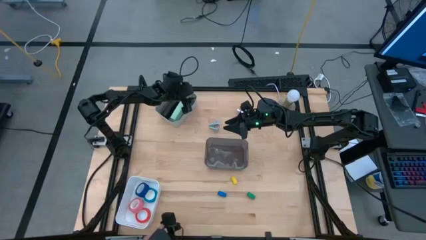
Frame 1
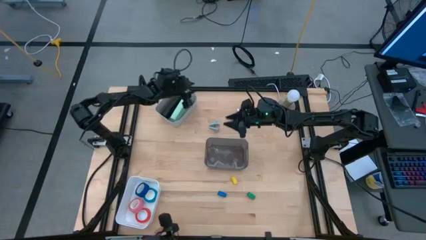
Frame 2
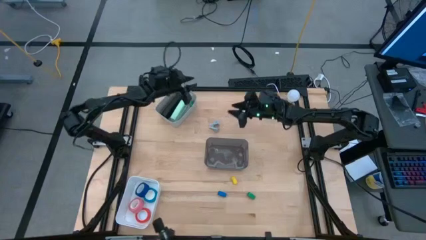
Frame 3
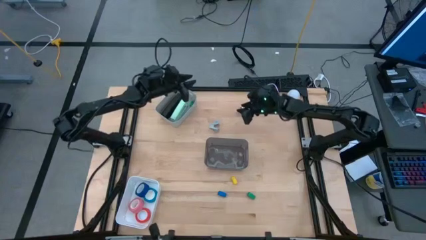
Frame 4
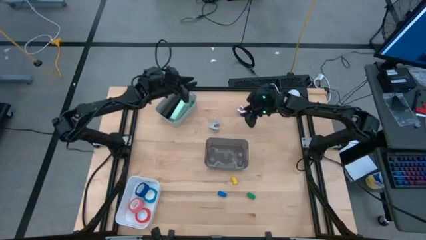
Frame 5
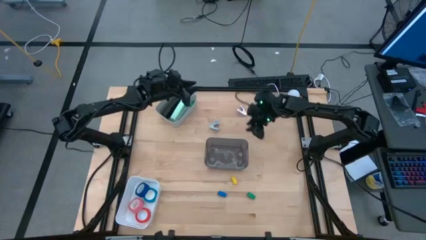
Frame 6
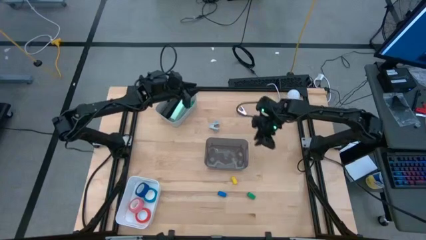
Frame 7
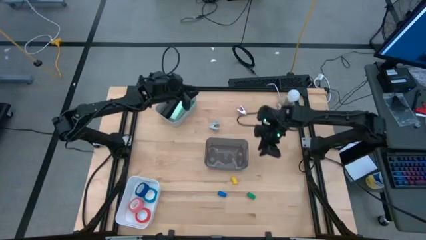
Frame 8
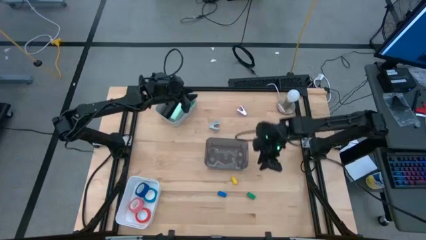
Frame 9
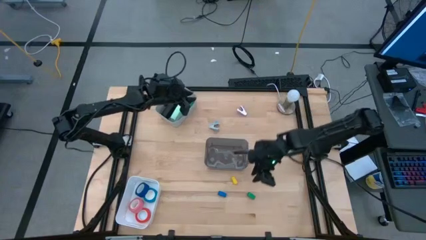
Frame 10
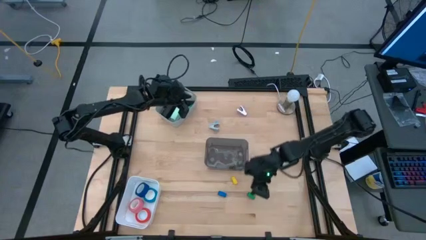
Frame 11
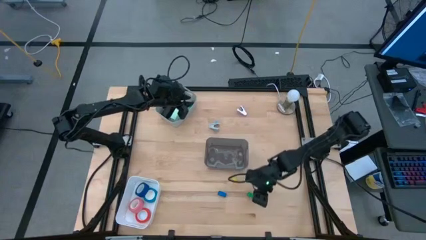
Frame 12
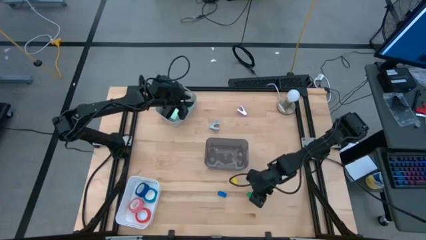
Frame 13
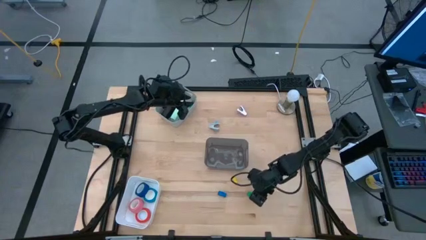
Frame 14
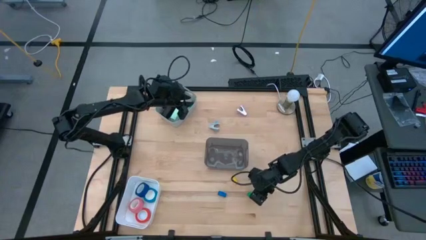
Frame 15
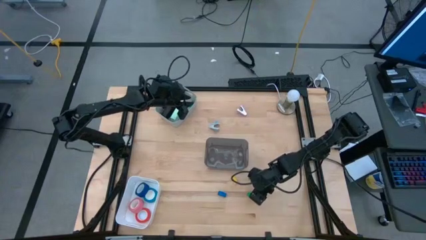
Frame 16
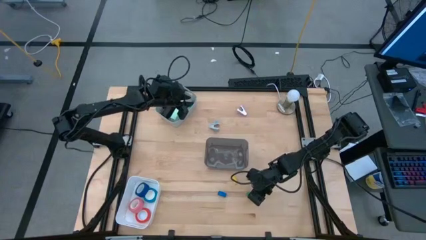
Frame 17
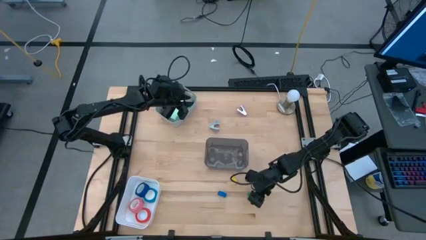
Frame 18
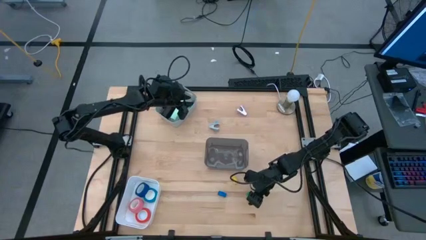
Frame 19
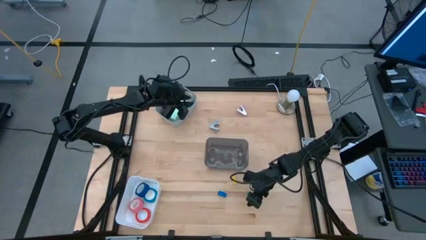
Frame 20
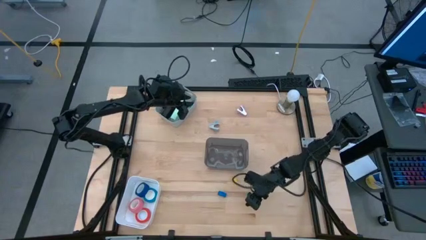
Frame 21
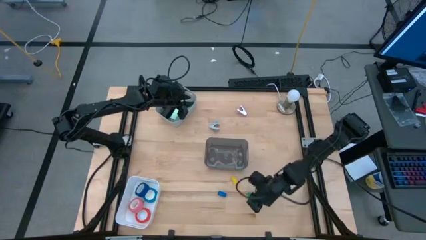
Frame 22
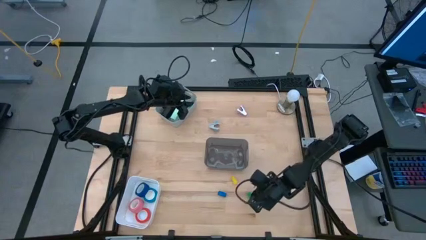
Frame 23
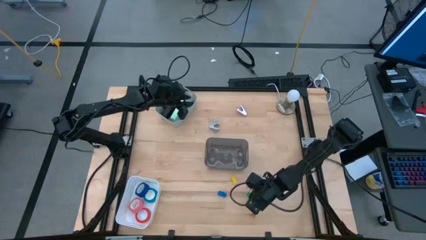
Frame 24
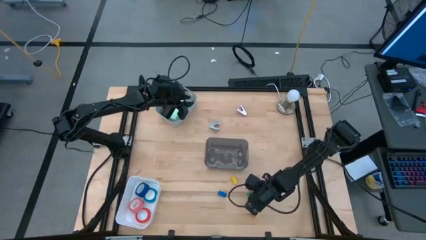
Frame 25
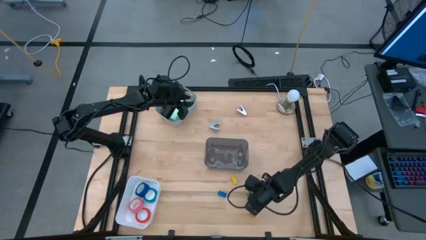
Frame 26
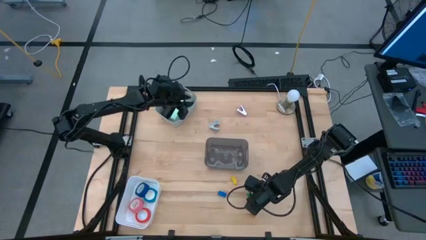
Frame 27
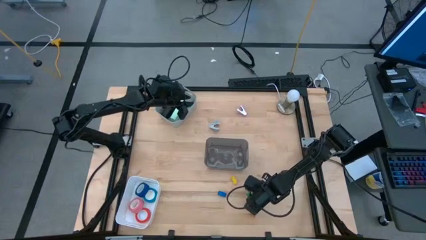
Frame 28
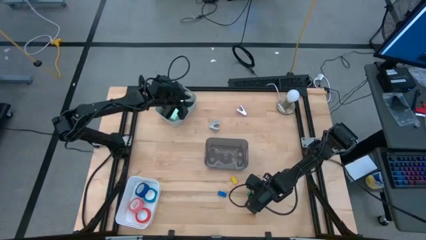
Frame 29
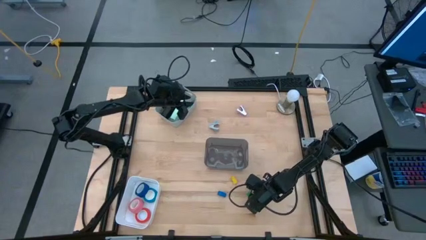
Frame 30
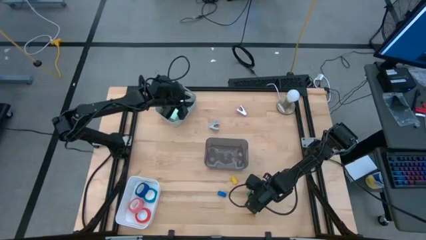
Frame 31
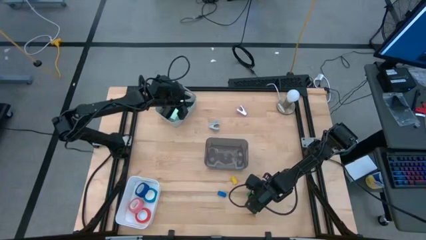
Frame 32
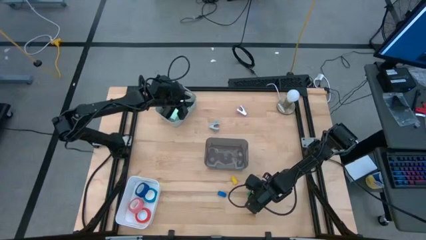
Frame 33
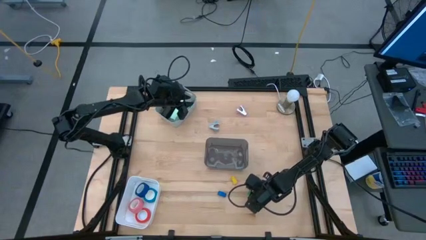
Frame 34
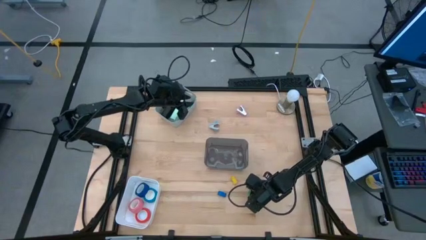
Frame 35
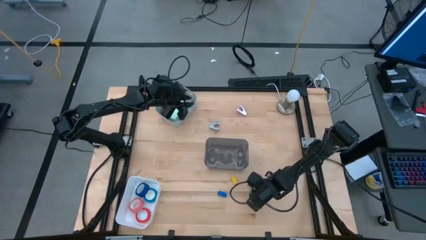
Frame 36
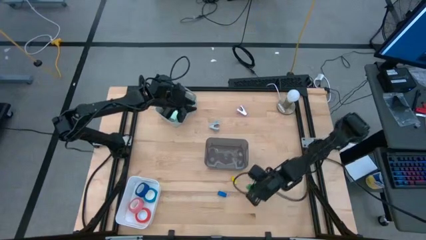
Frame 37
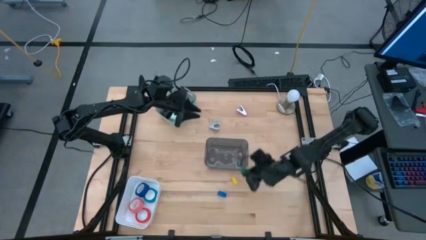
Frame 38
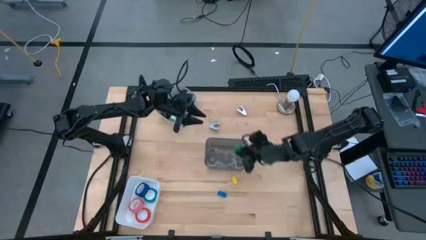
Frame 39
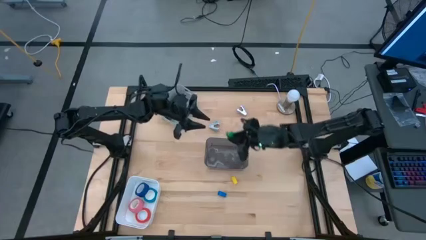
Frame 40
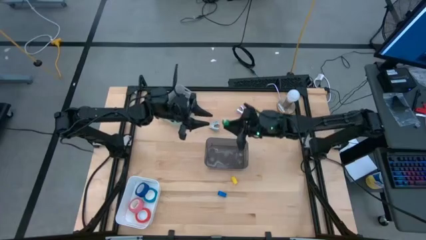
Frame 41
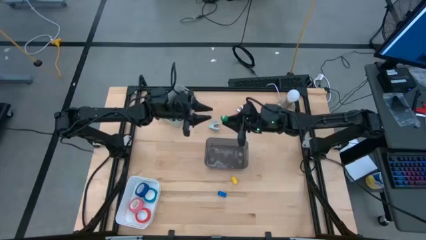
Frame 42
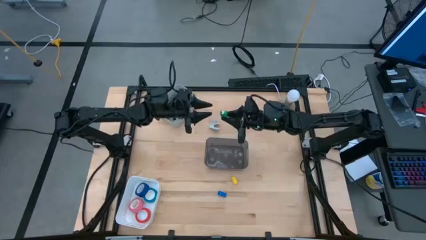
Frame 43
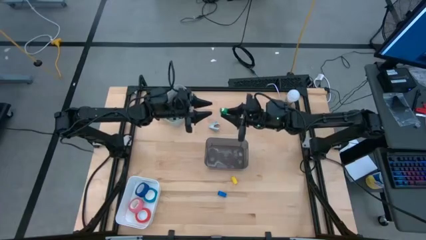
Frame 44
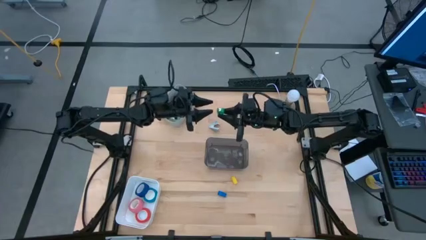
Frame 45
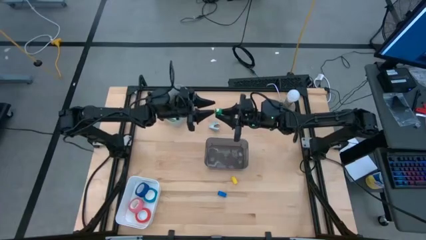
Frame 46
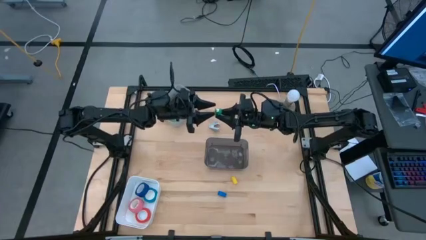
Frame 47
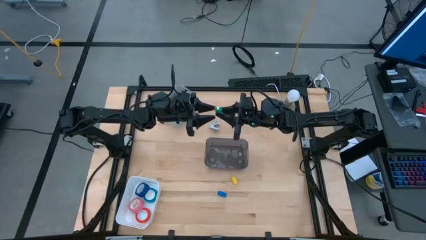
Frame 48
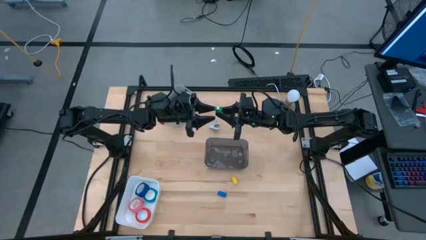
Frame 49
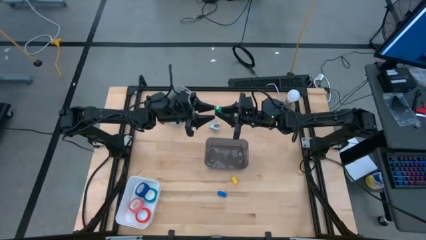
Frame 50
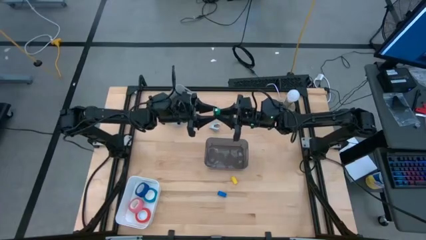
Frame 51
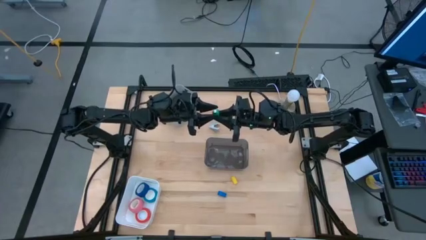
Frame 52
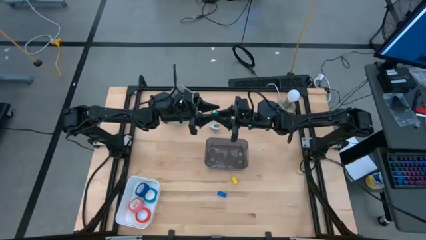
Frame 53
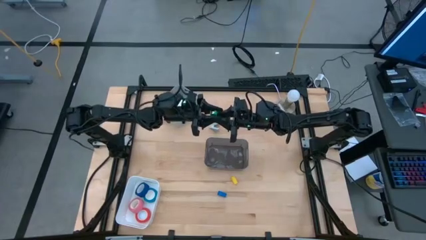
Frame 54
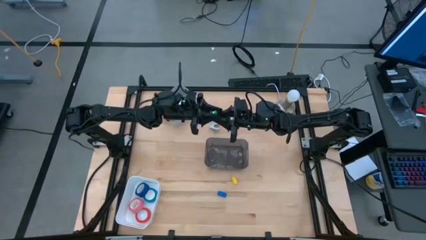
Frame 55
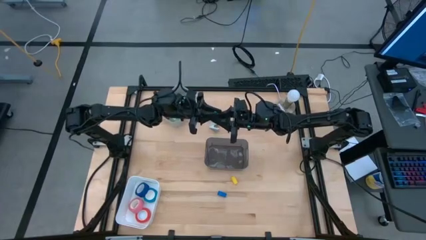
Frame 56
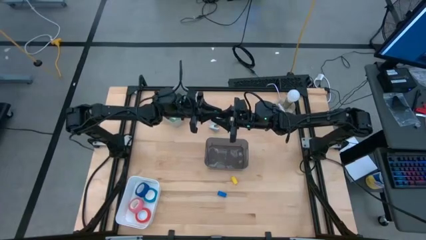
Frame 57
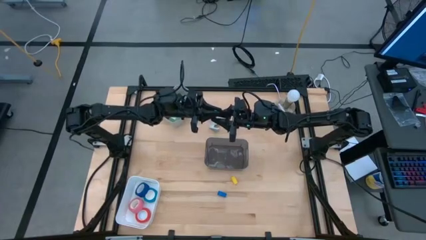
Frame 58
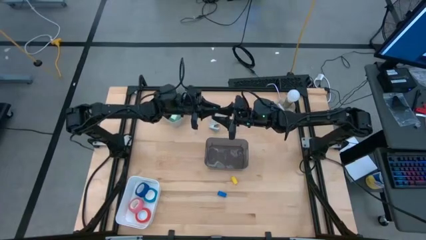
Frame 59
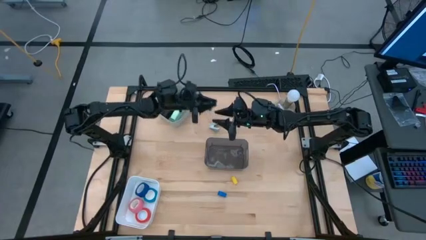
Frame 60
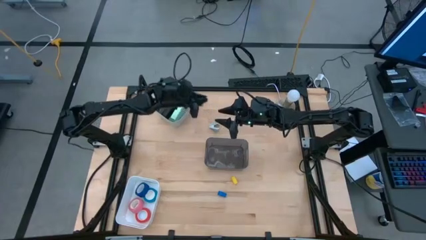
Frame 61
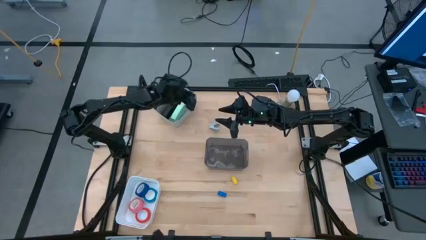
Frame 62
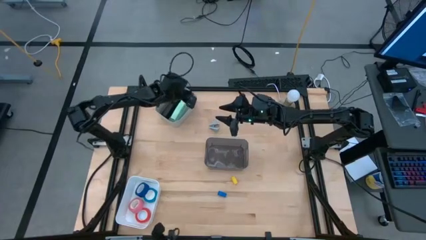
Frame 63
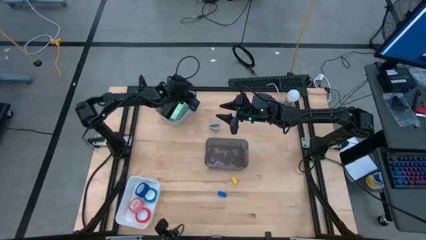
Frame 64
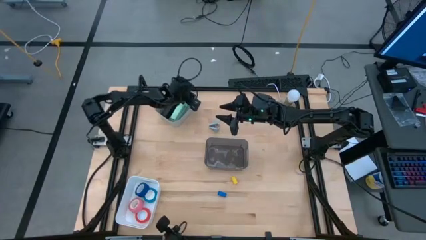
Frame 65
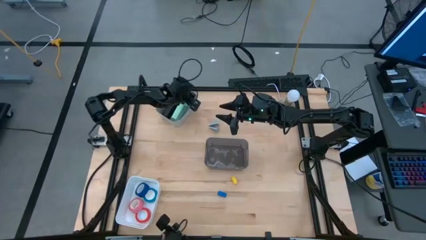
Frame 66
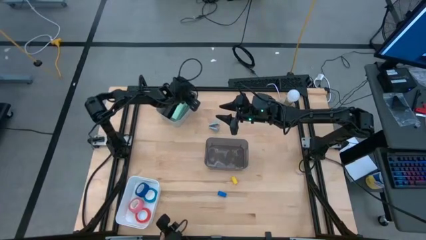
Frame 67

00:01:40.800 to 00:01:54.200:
Task: Pick and place Stapler, Stapler remover, tape
Put the small green stapler into the gray bin

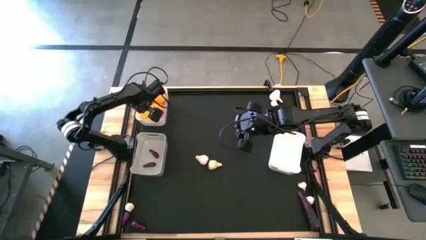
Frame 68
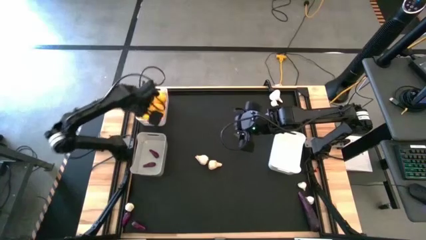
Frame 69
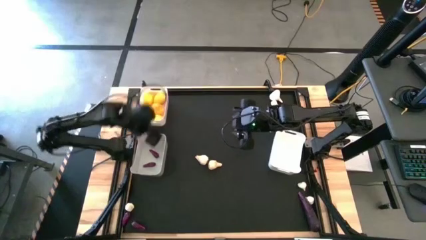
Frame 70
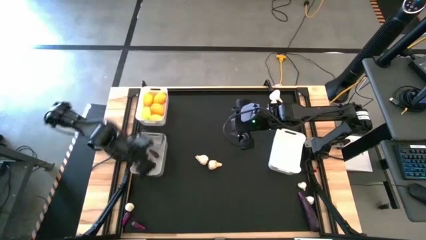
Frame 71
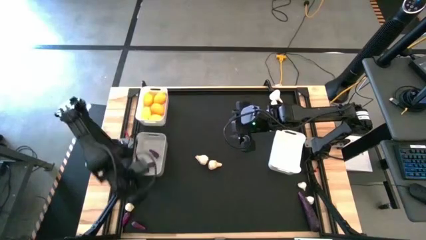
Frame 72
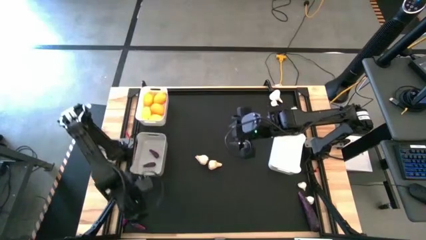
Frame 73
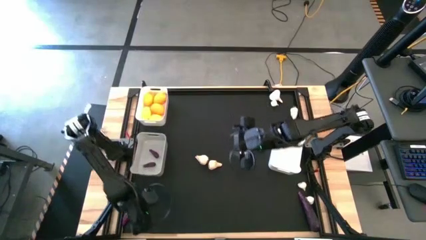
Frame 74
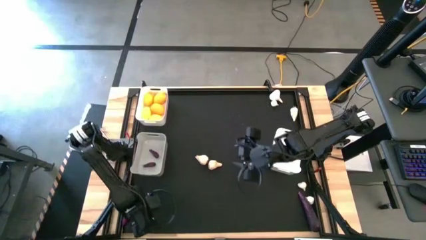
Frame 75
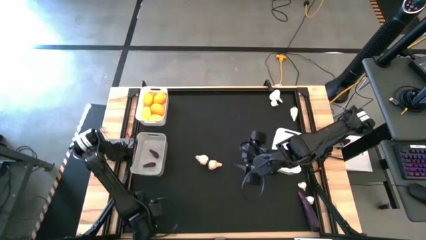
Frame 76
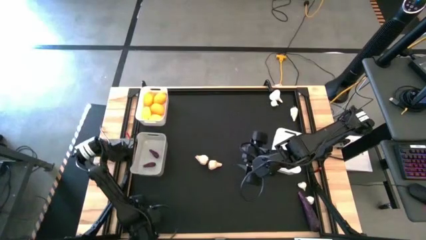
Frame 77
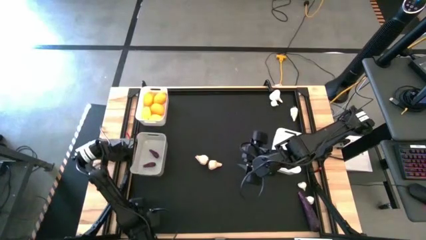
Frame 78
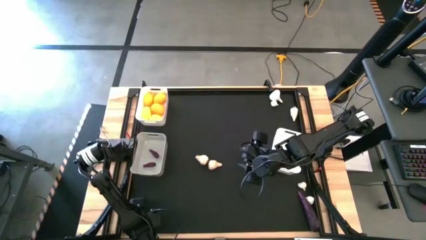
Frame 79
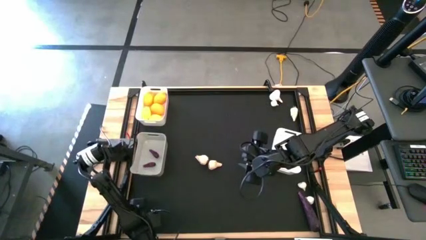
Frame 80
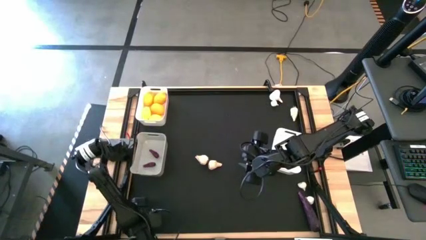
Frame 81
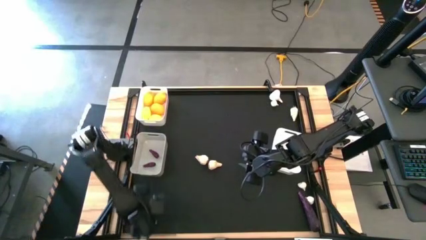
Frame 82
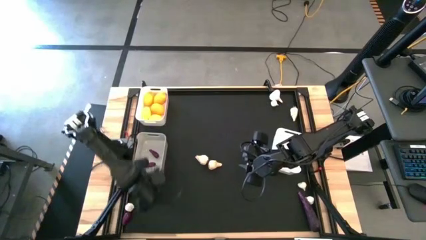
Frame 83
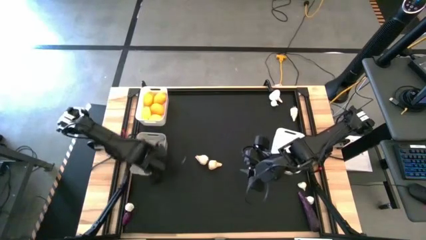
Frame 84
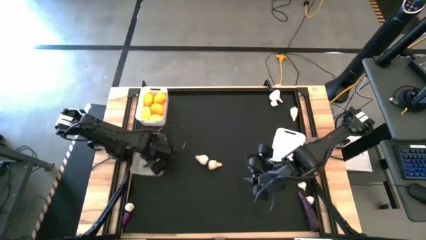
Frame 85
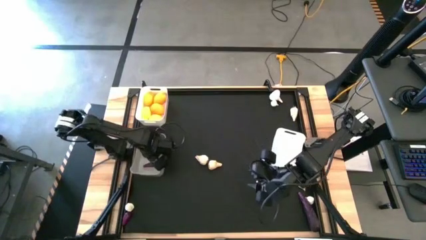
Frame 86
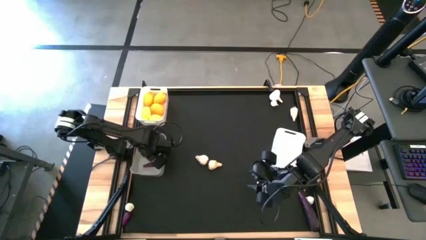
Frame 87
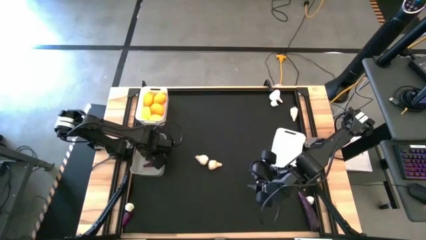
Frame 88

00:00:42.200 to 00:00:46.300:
Task: Sort produce into baskets
Put the violet eggplant into the gray bin
